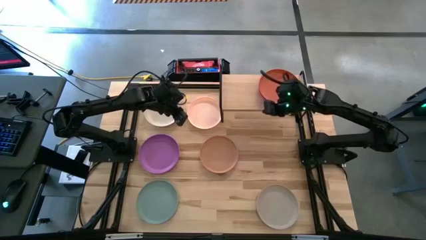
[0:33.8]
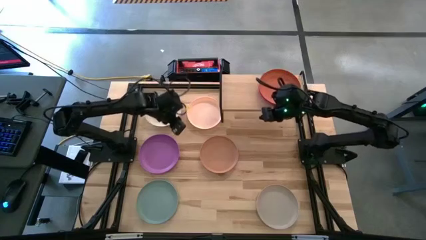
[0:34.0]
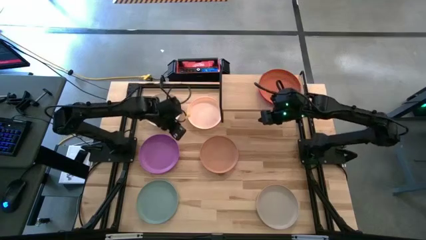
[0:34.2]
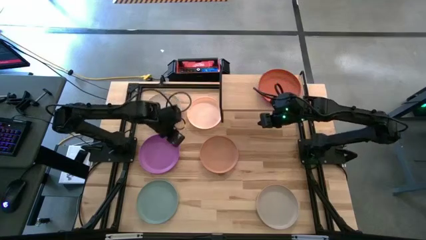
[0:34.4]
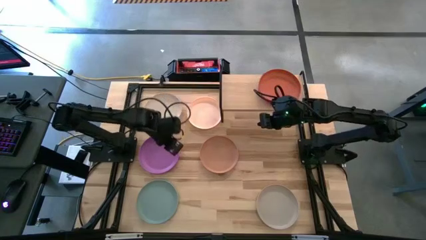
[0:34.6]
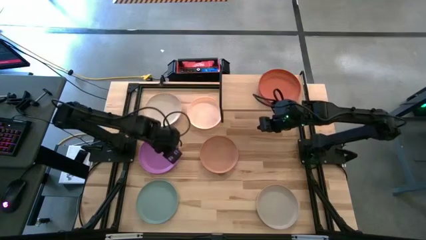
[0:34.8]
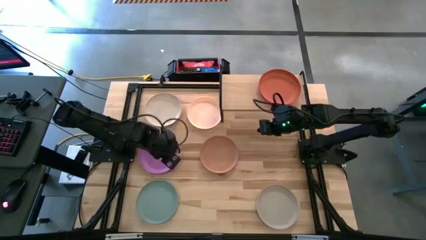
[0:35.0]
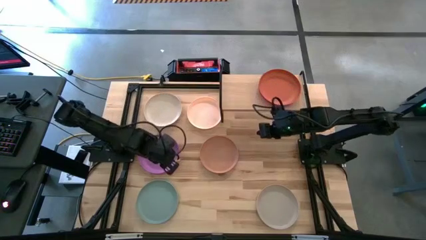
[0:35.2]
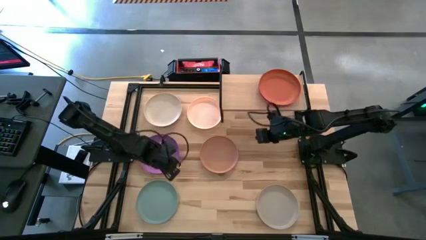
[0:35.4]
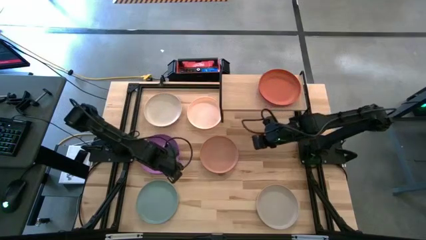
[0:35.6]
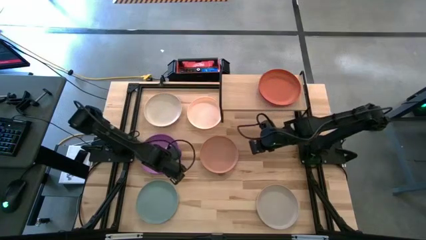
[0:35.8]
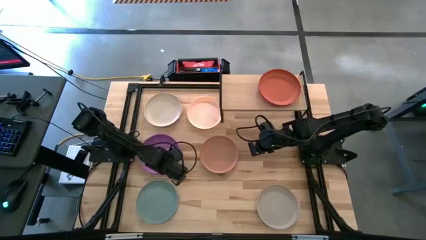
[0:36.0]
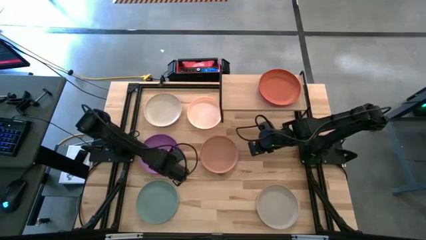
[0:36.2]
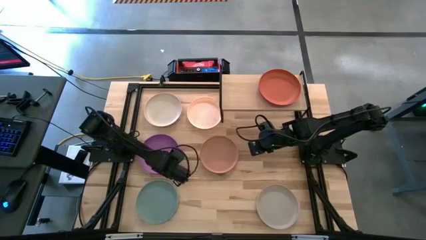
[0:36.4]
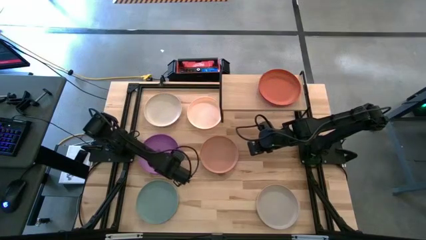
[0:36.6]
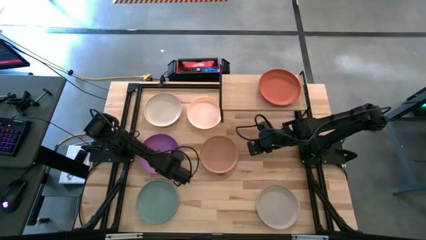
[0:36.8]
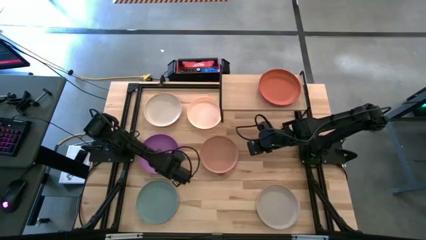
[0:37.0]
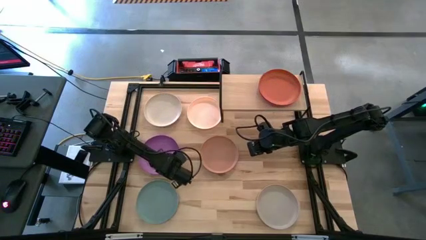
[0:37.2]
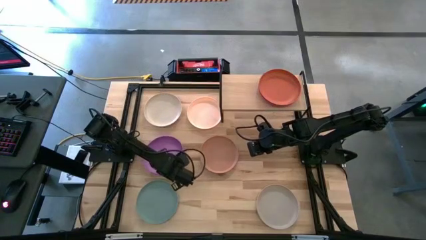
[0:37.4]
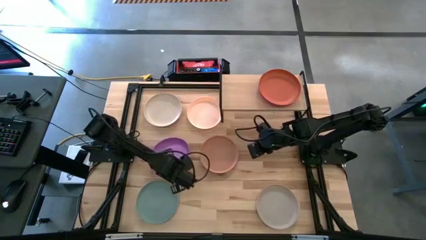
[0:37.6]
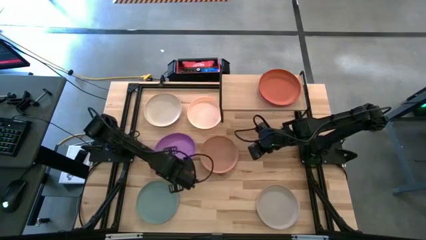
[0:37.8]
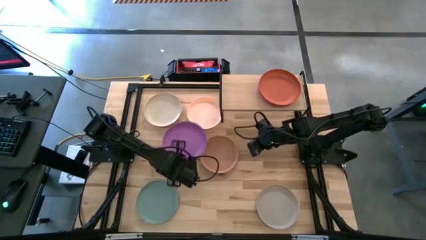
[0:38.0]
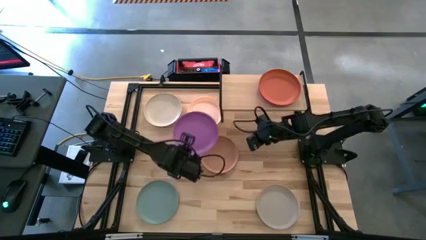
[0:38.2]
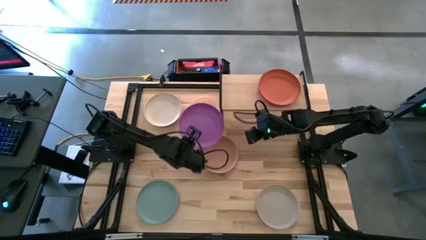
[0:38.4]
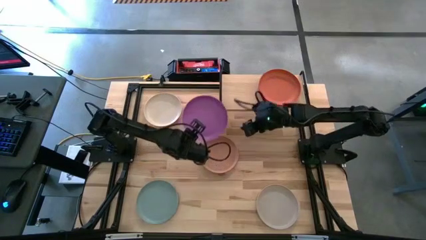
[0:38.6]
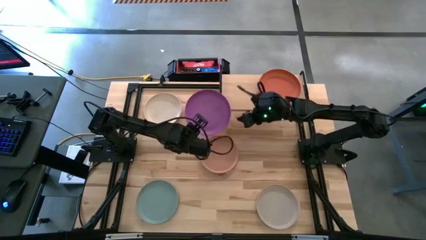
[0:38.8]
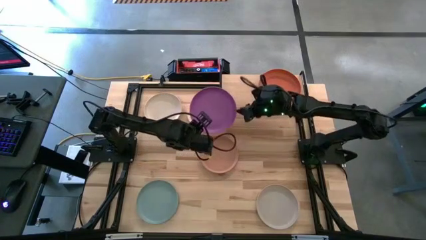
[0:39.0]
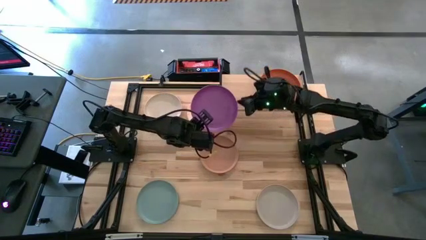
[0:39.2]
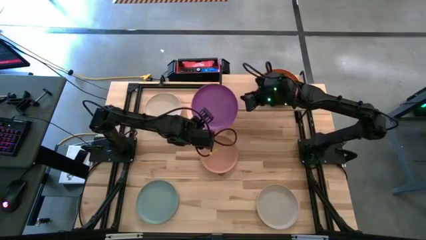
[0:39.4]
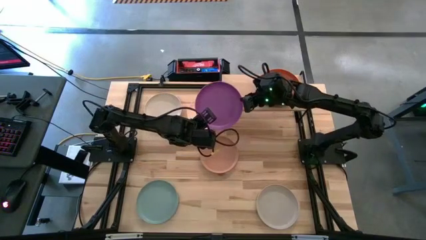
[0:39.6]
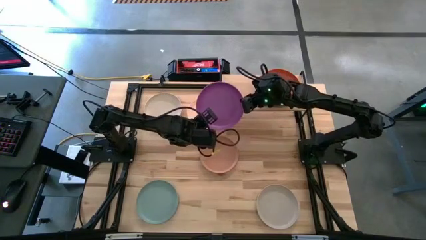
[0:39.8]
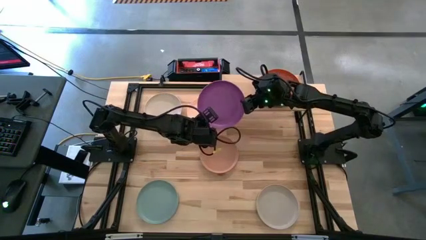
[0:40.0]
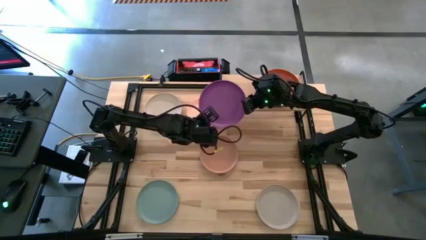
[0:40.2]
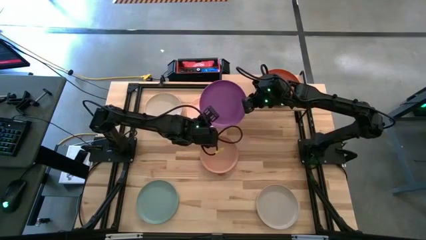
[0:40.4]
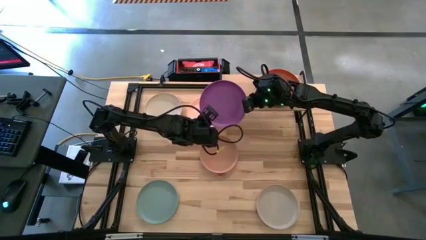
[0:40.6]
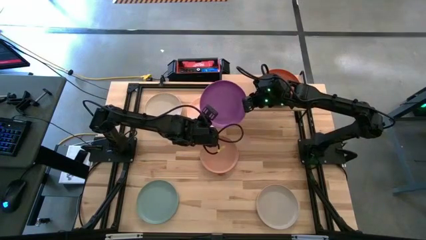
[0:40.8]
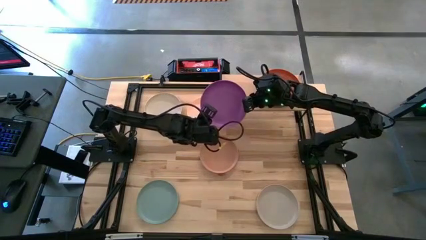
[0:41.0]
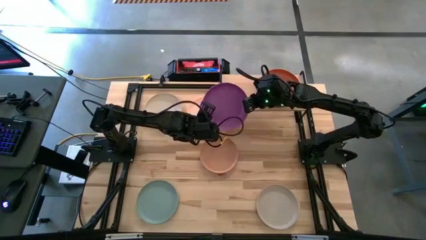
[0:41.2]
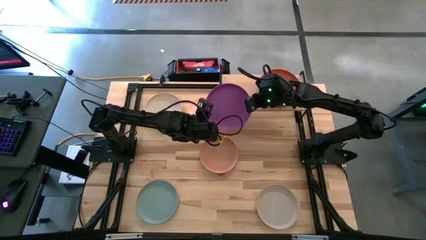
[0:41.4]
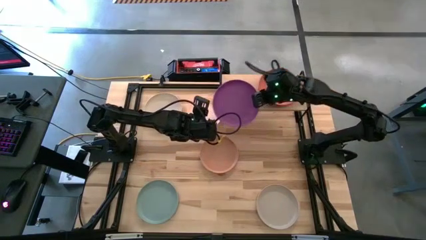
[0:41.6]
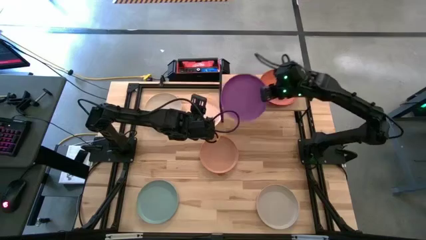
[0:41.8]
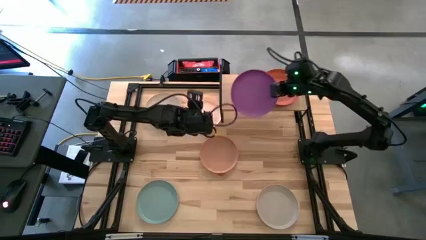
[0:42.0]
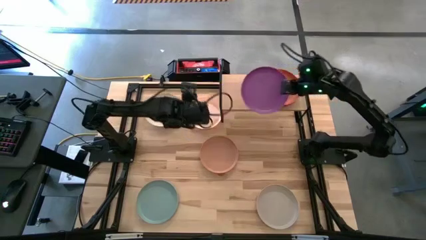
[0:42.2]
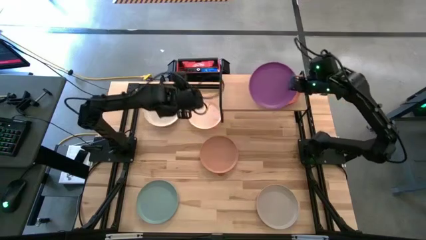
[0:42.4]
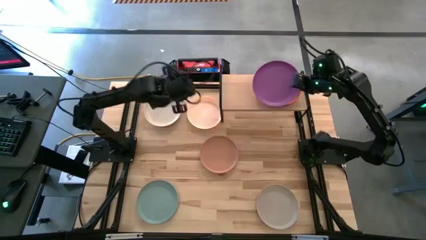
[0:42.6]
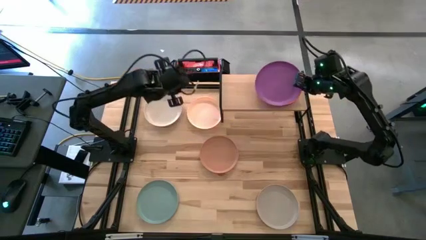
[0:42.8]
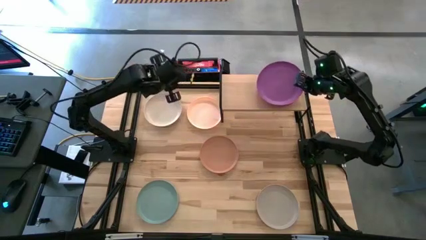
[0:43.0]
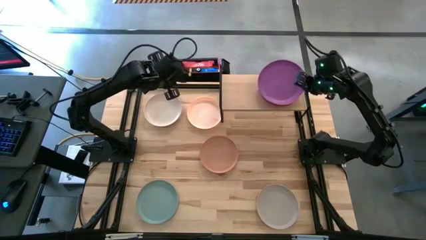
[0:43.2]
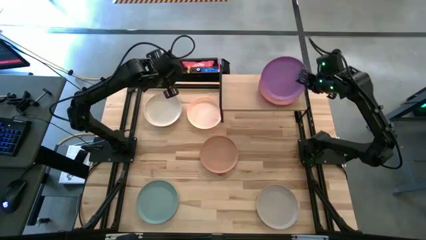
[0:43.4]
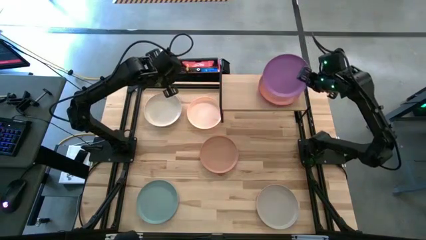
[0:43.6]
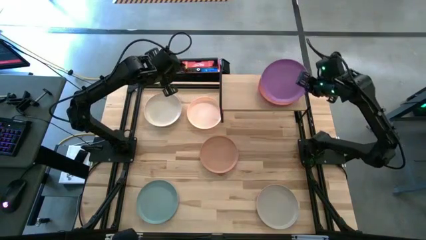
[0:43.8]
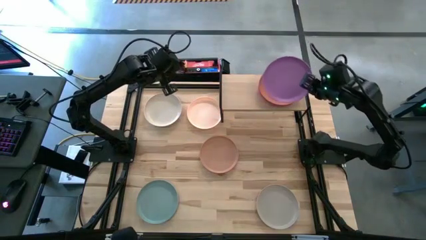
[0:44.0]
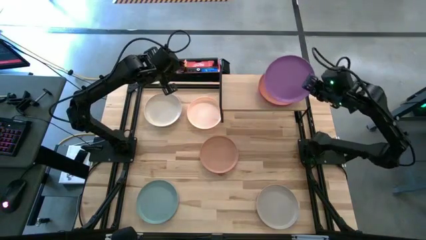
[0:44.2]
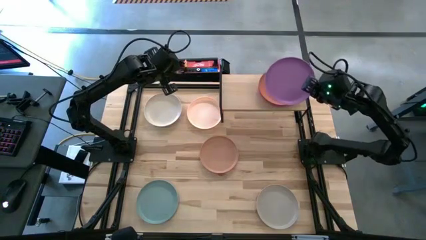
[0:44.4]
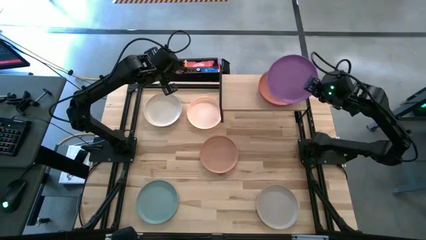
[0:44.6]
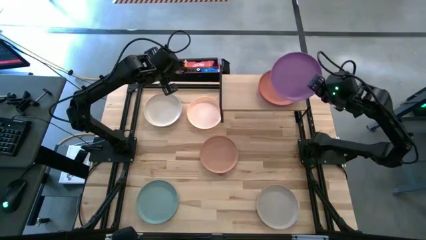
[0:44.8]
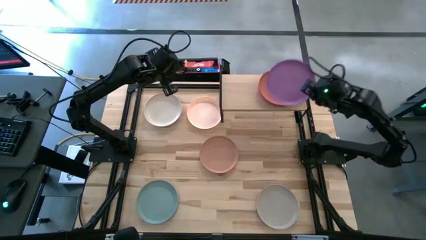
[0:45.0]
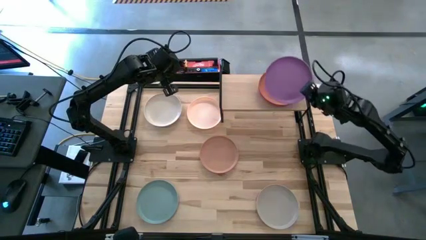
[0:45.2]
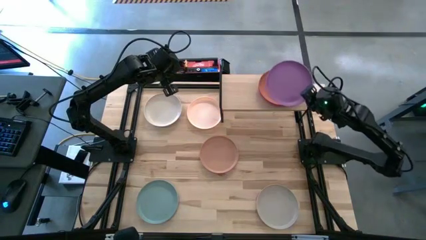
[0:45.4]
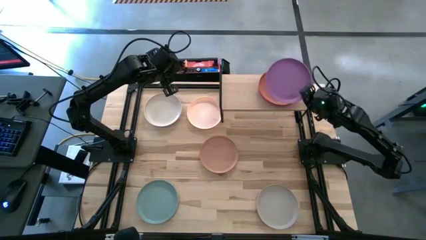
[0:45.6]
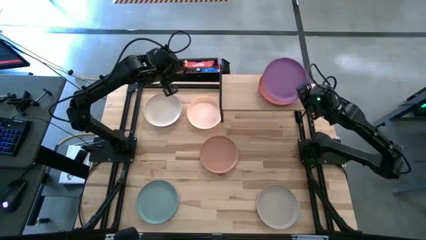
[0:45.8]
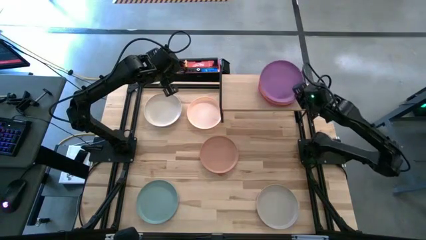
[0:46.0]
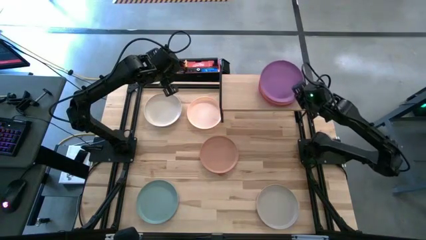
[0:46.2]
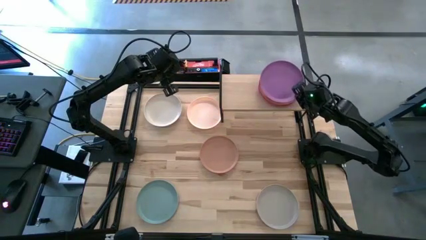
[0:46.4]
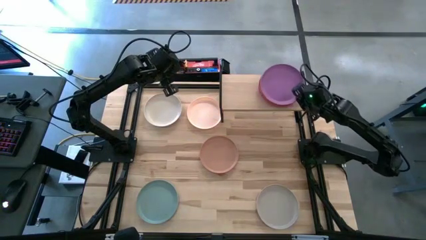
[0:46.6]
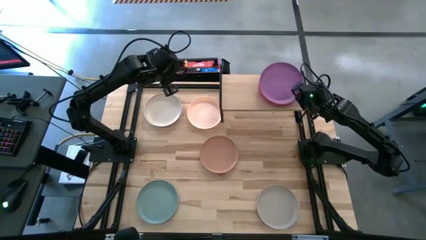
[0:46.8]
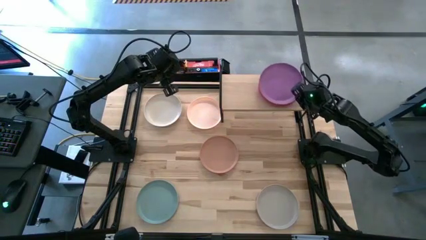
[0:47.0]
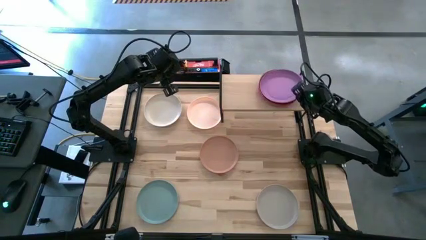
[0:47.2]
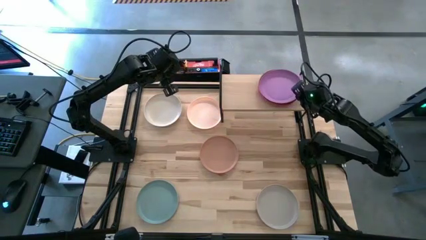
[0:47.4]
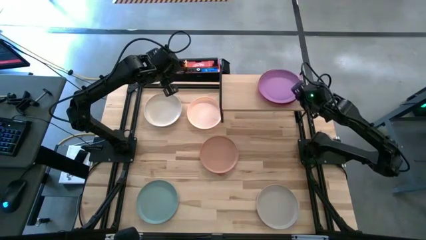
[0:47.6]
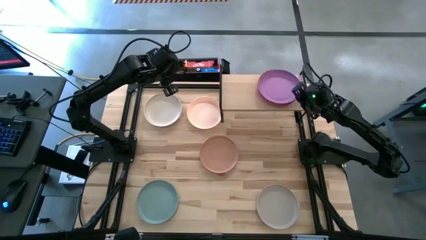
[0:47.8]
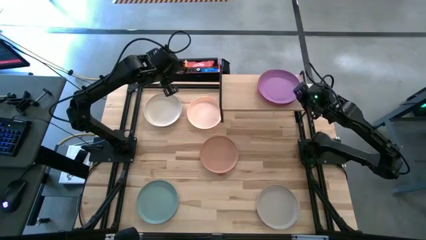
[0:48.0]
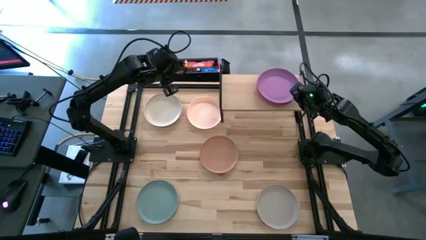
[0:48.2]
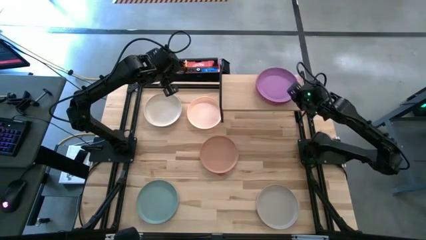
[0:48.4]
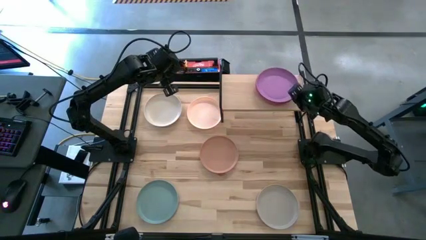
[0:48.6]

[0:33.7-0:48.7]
Task: Place and stack plates onto a shelf
Stack the purple plate on top of the orange plate
